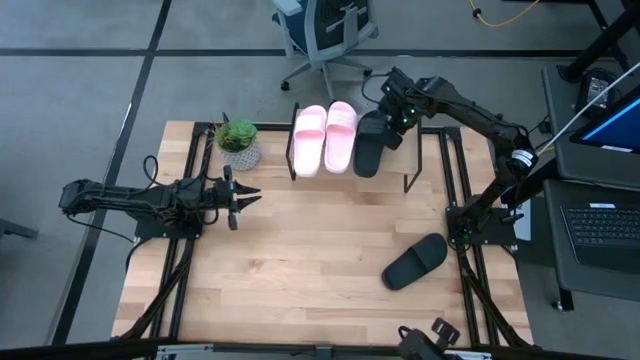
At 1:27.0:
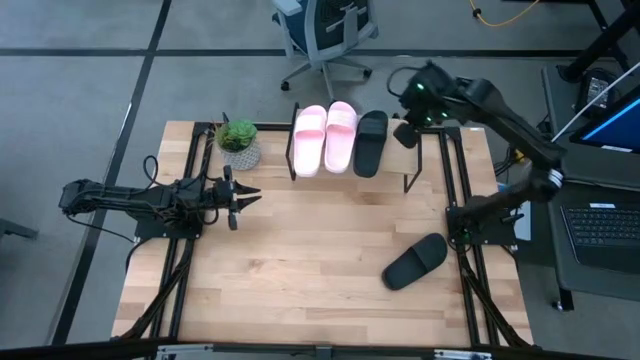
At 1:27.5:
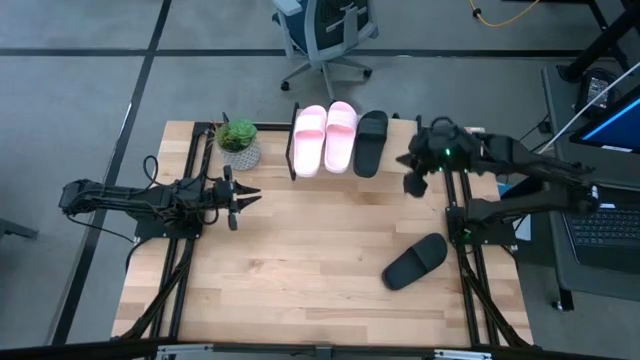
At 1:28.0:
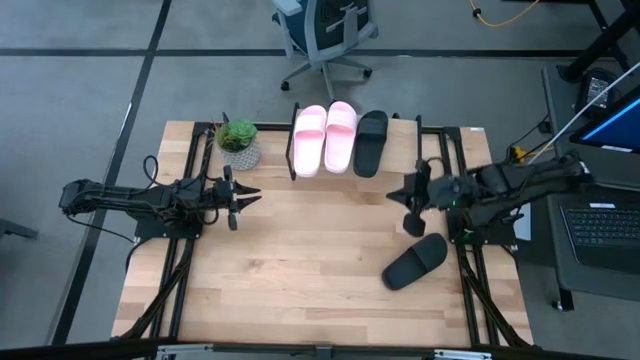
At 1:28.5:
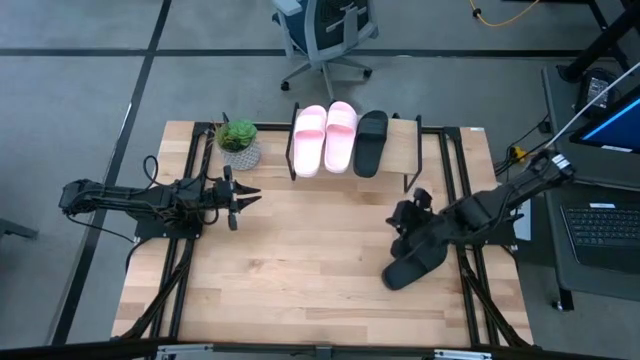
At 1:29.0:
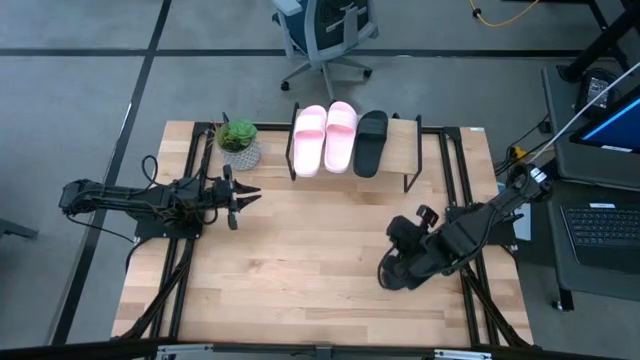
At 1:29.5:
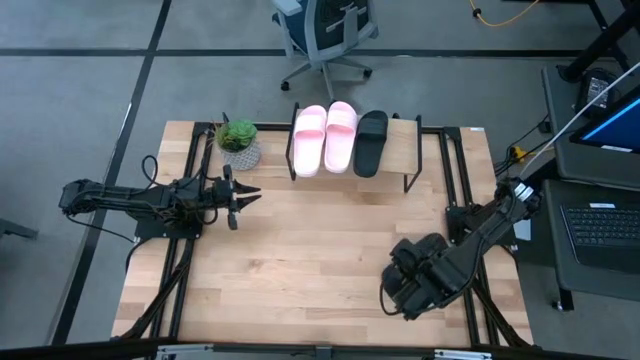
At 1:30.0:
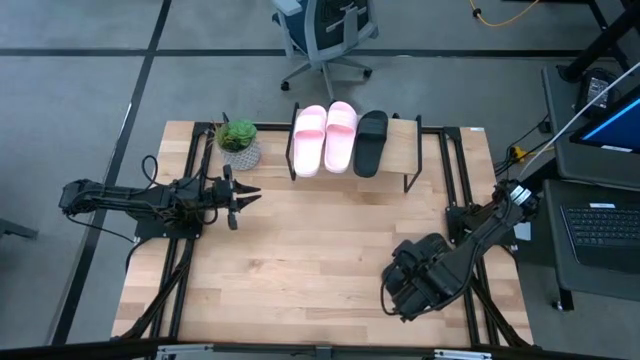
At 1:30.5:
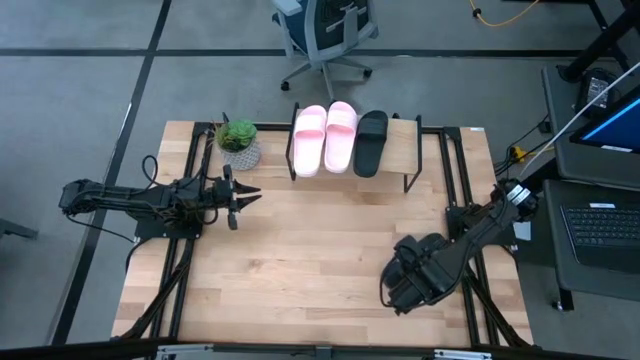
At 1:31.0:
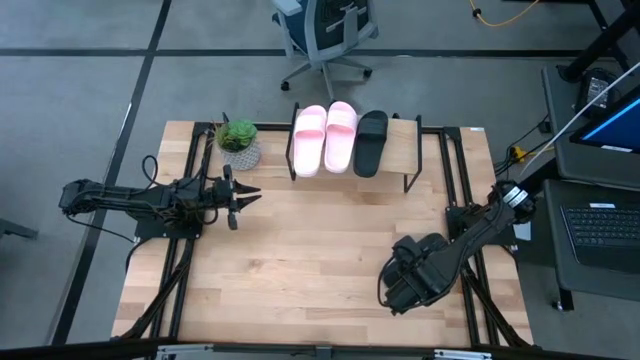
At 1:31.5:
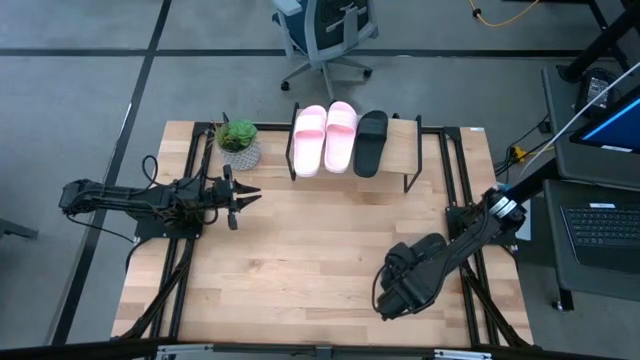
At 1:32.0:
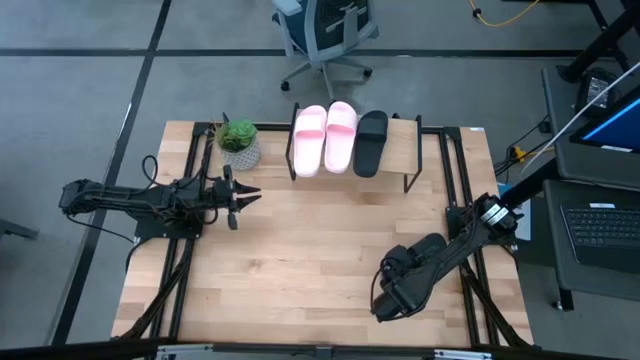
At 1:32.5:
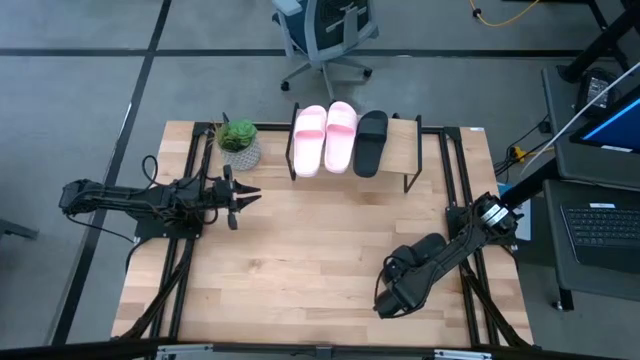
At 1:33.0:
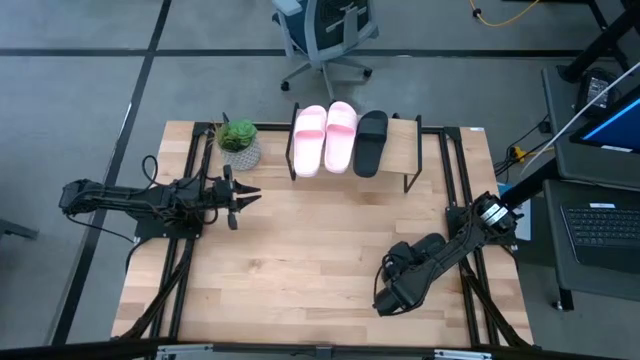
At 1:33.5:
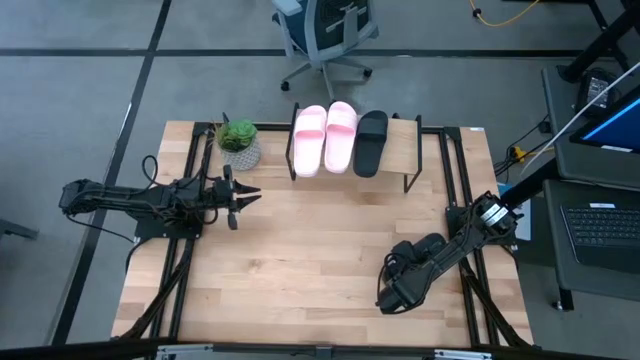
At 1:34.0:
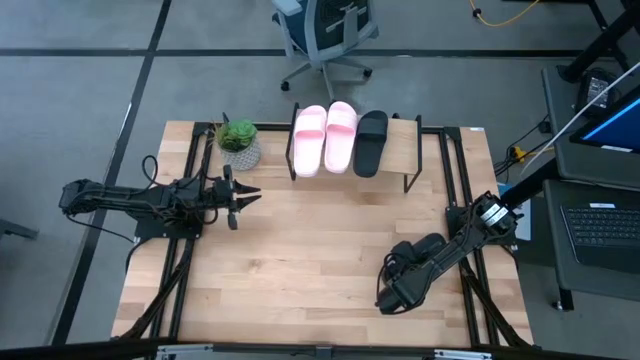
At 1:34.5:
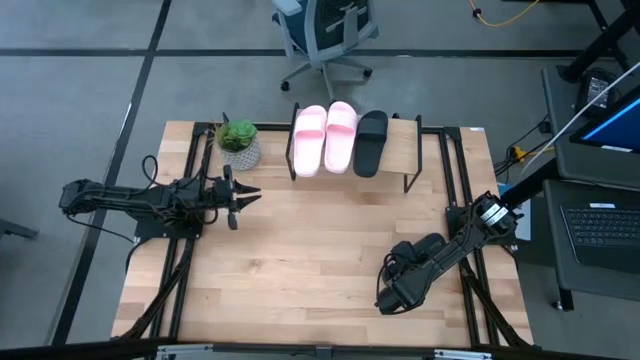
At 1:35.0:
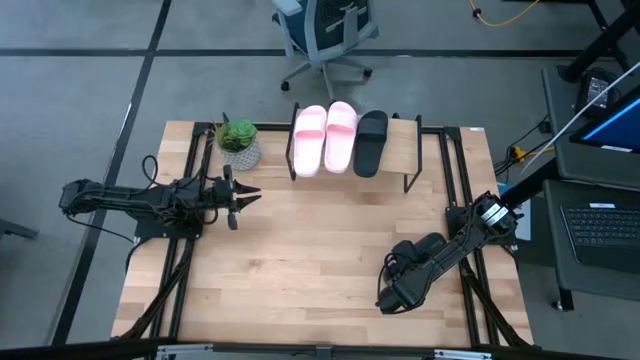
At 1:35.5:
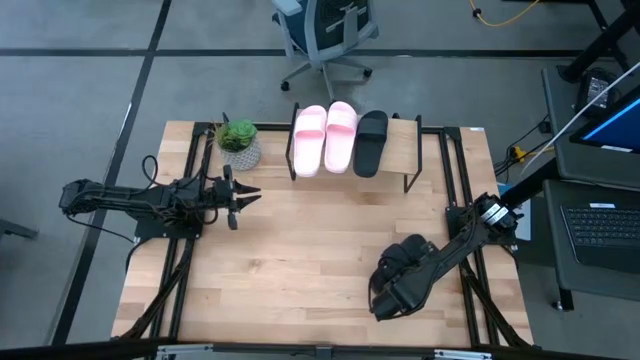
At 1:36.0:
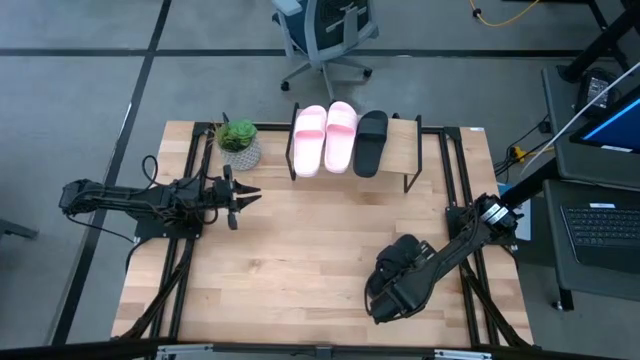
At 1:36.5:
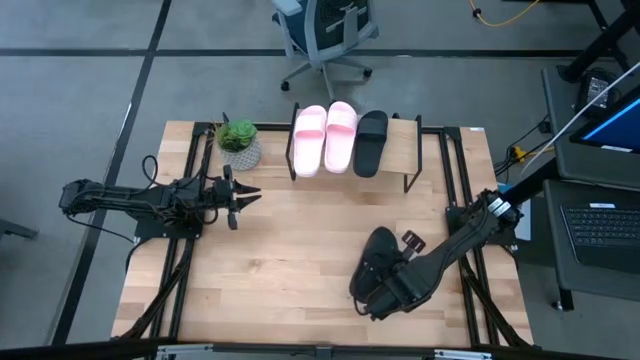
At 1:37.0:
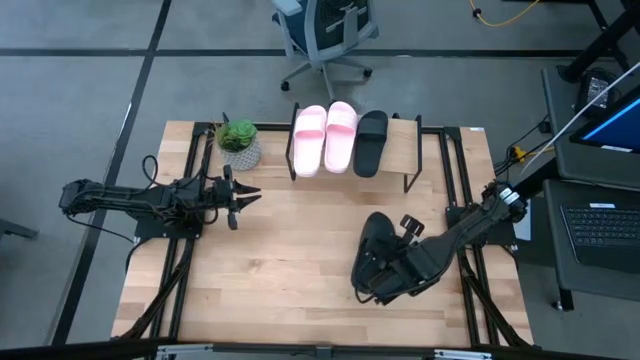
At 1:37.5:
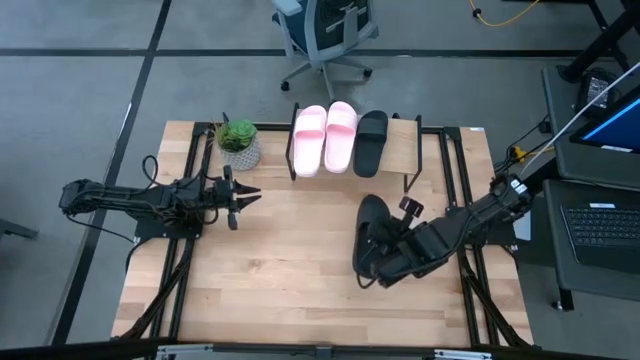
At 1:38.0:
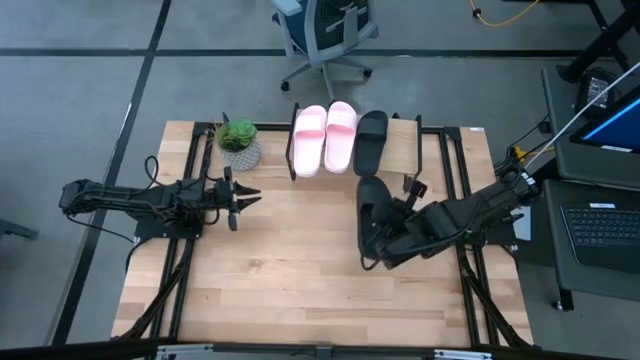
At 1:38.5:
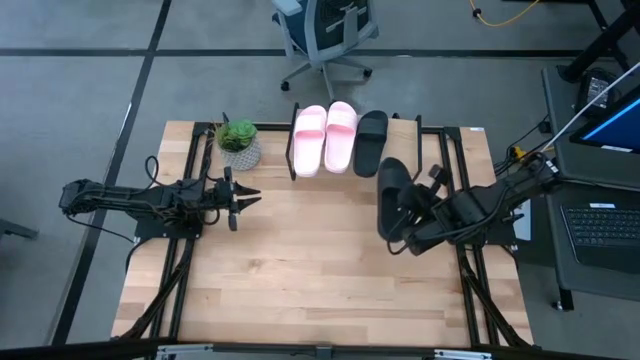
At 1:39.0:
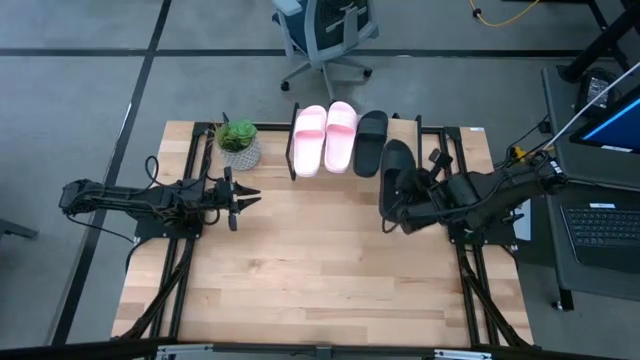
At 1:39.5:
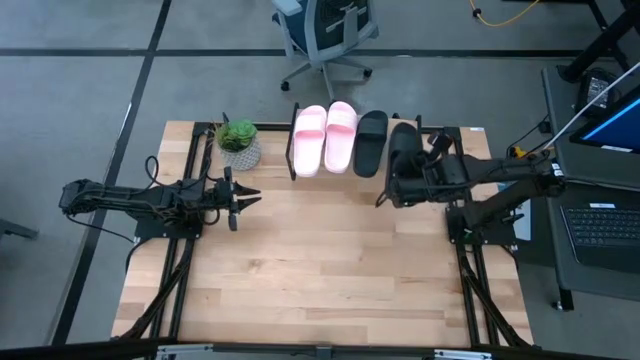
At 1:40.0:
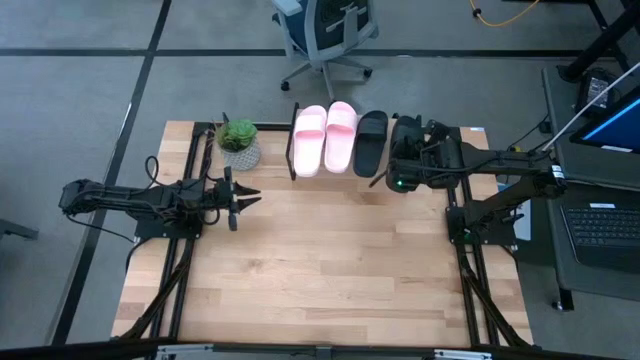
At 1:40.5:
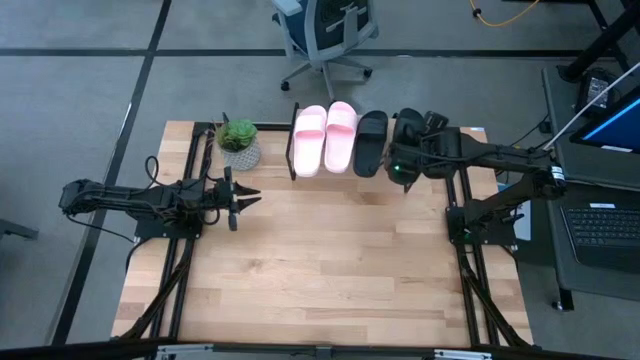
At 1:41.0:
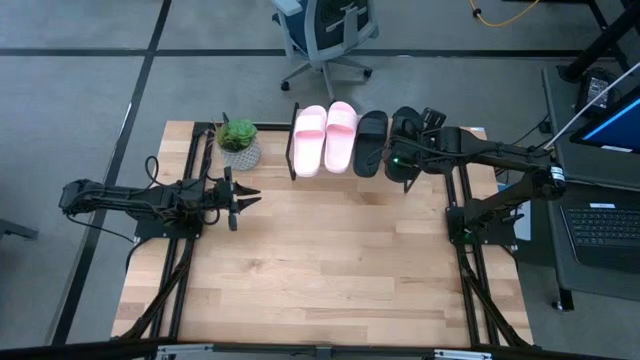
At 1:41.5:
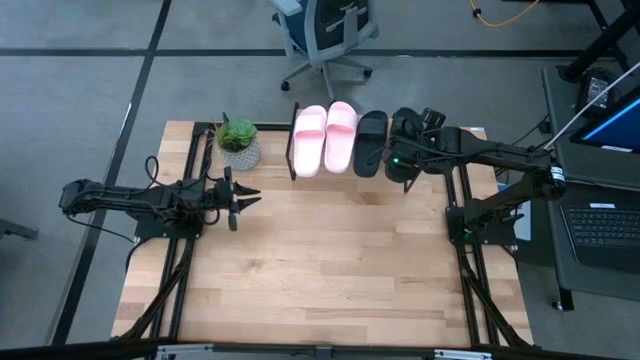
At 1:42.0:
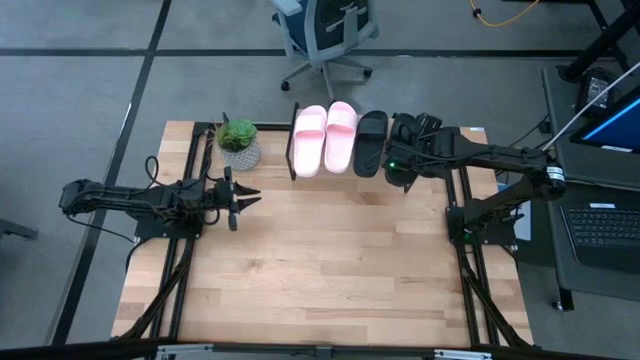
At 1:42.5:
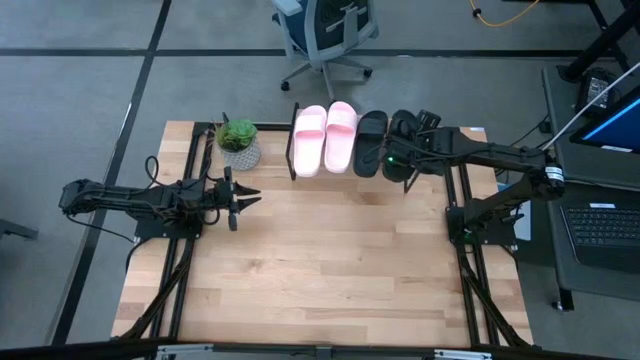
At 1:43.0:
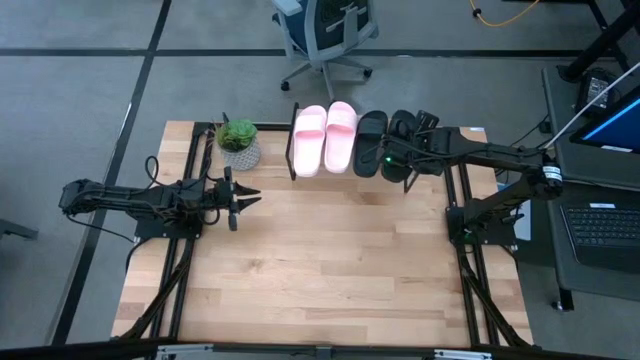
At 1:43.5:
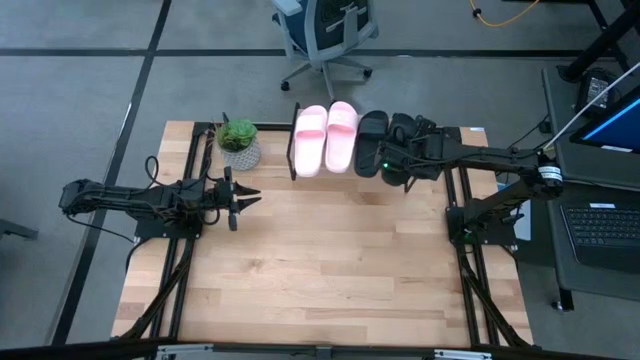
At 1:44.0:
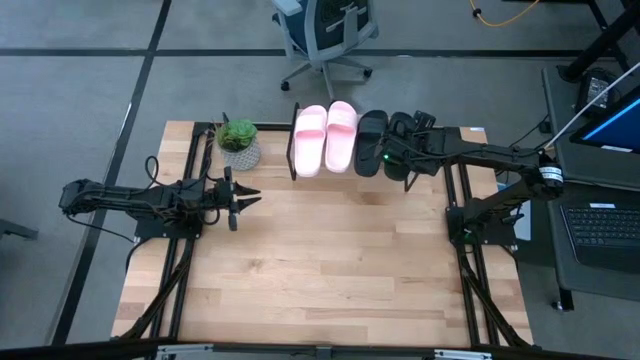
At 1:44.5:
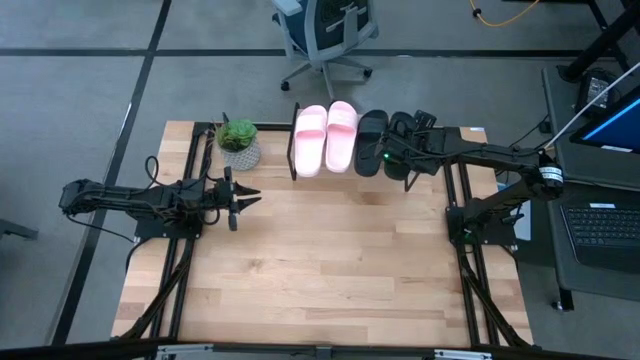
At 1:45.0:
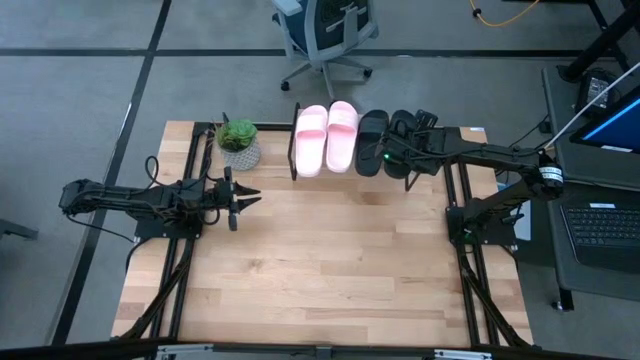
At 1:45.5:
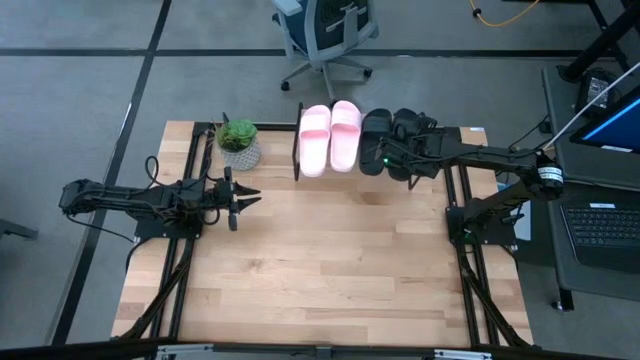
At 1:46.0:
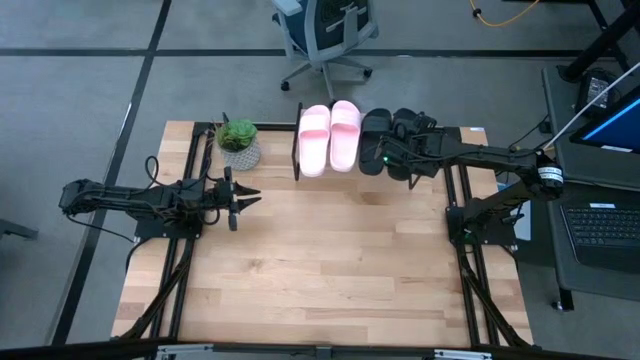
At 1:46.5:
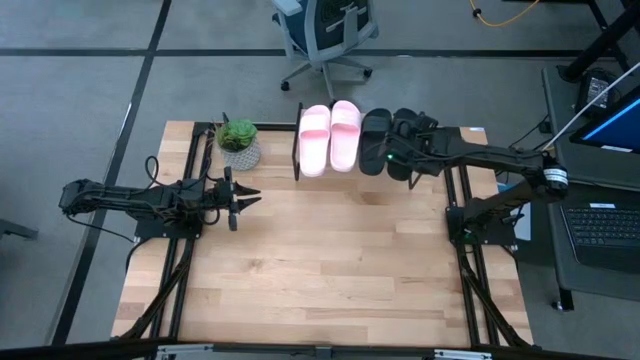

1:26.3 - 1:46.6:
Task: Pick and place slides into the shelf
Put the black slide on the shelf

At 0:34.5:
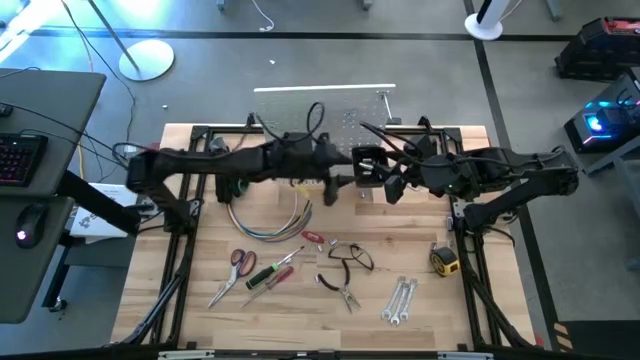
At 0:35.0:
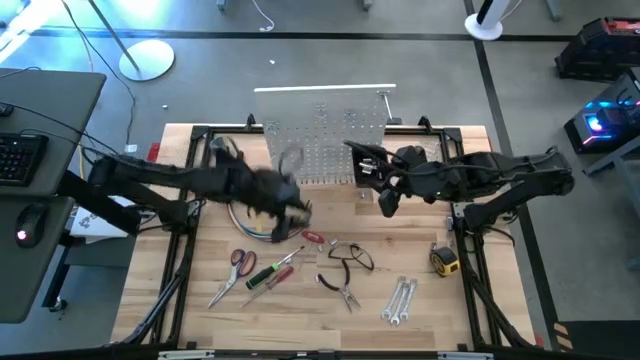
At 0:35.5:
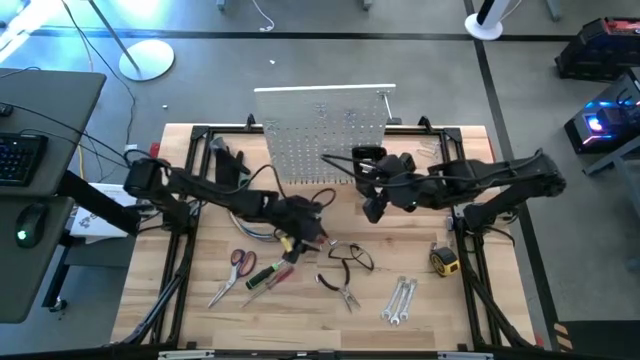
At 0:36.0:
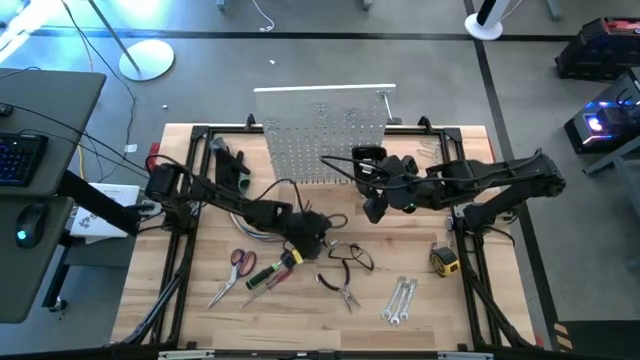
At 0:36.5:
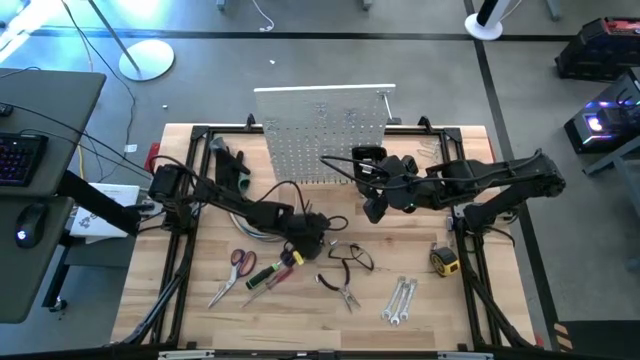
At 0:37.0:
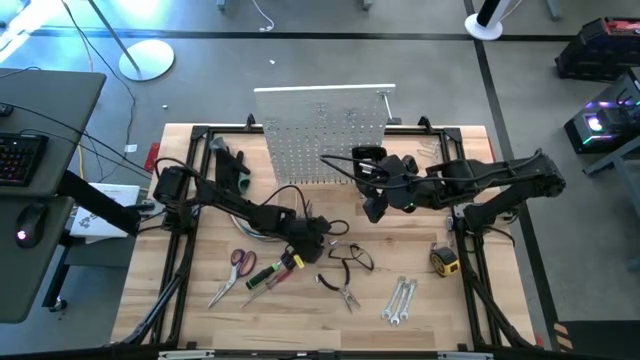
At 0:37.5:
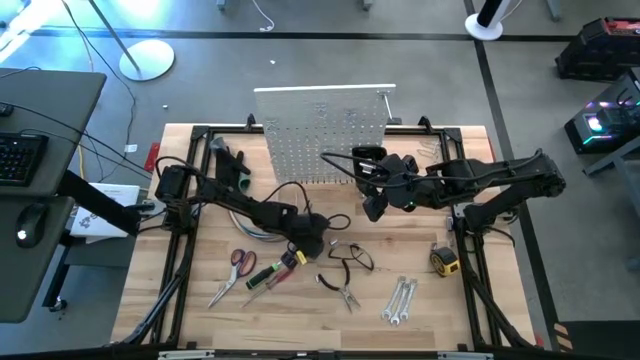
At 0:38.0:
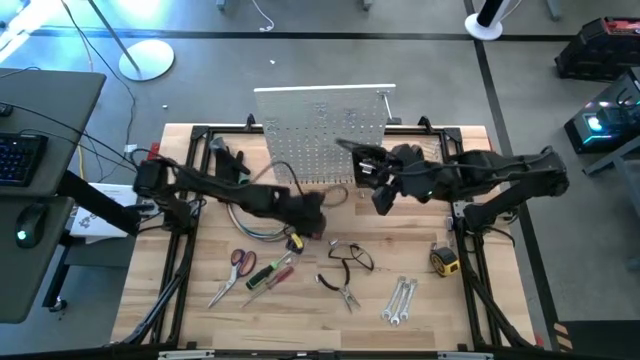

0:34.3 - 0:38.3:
Task: Hang tools onto peg board
Put the socket into the black bin on the peg board
